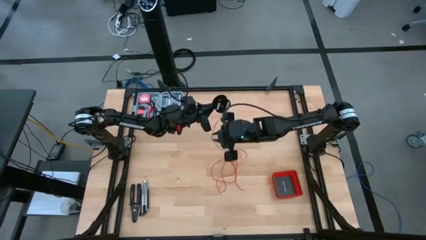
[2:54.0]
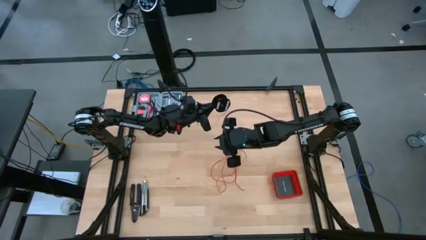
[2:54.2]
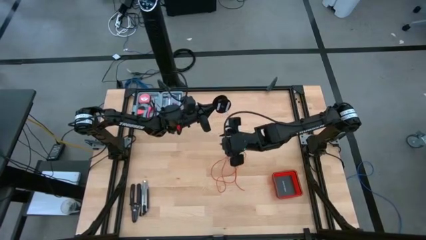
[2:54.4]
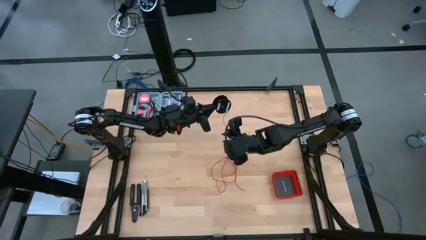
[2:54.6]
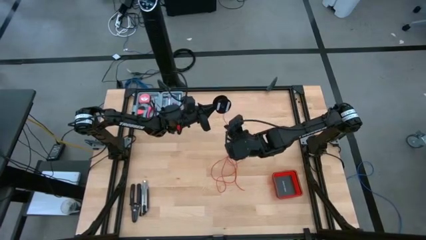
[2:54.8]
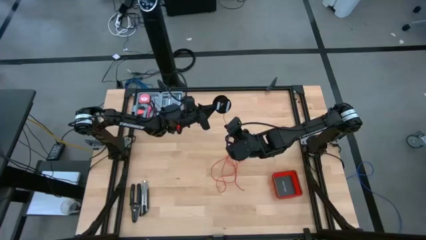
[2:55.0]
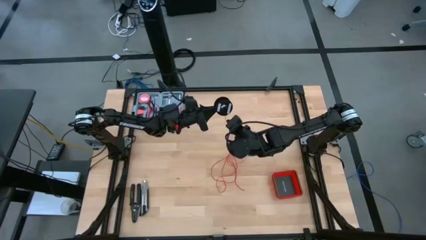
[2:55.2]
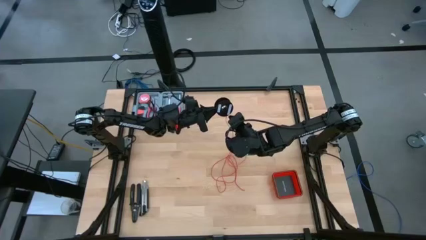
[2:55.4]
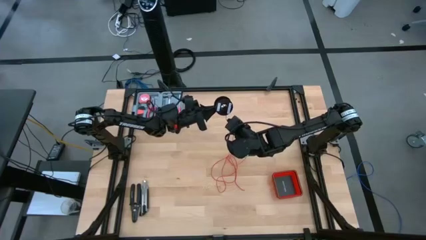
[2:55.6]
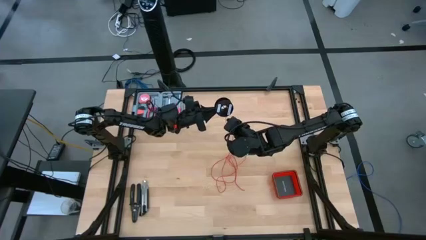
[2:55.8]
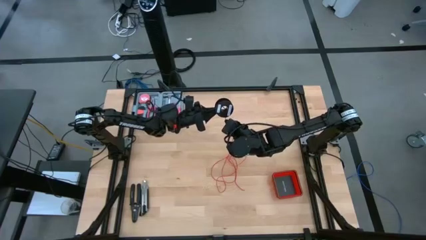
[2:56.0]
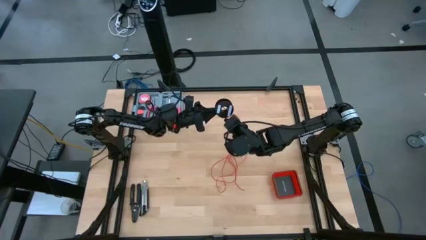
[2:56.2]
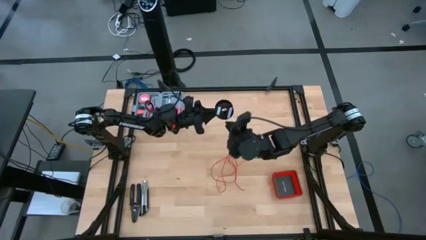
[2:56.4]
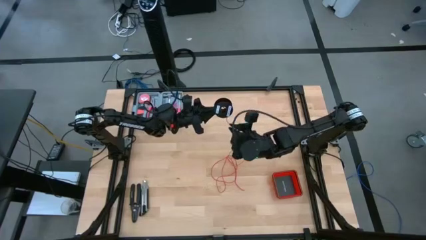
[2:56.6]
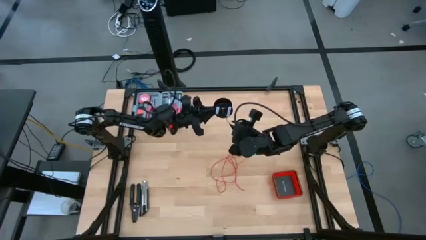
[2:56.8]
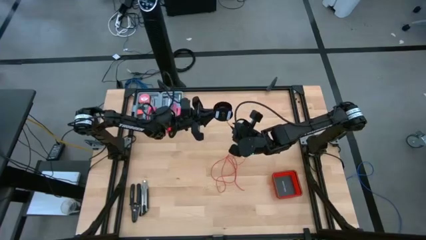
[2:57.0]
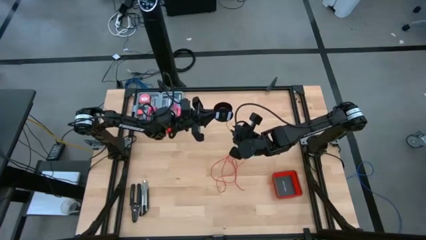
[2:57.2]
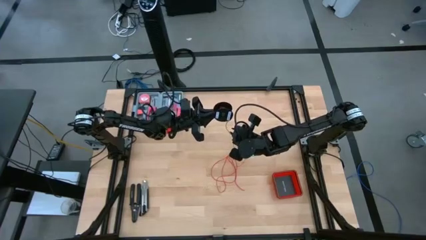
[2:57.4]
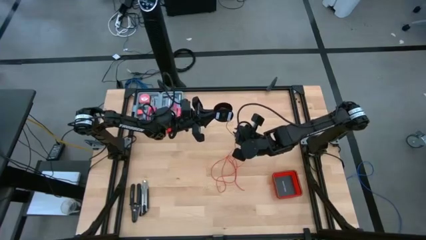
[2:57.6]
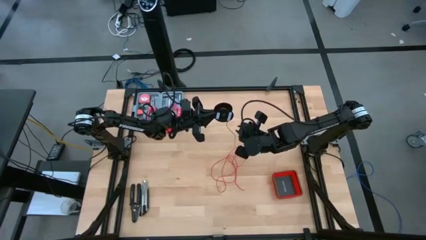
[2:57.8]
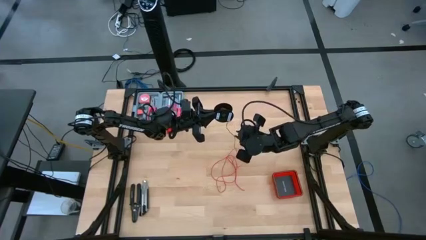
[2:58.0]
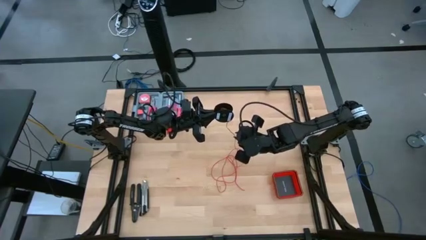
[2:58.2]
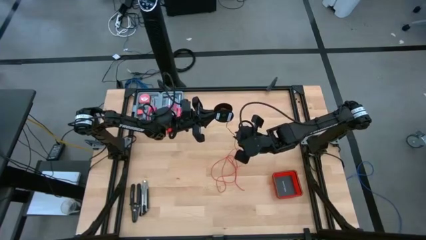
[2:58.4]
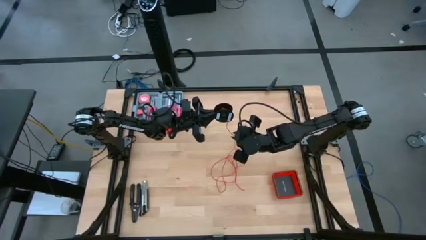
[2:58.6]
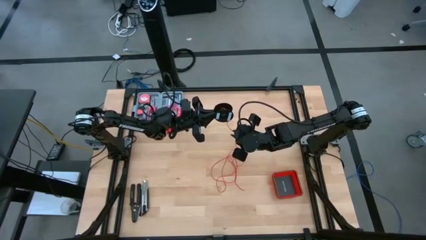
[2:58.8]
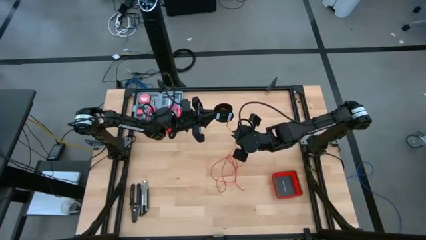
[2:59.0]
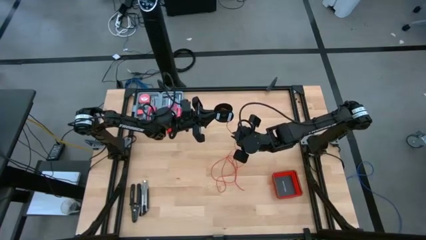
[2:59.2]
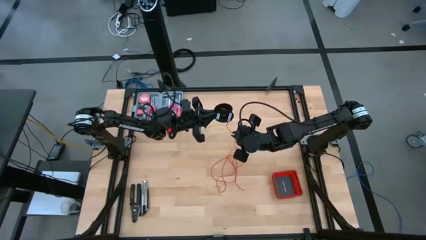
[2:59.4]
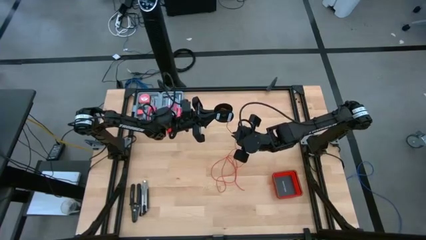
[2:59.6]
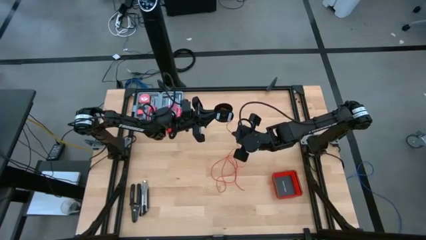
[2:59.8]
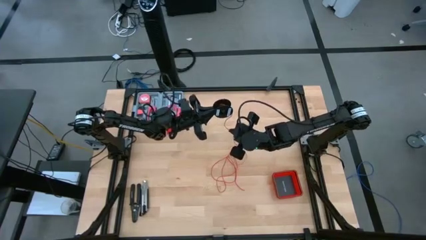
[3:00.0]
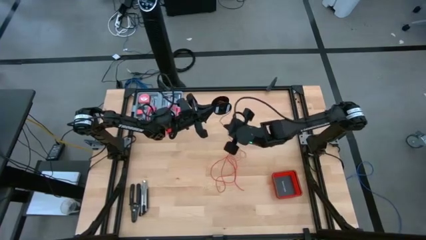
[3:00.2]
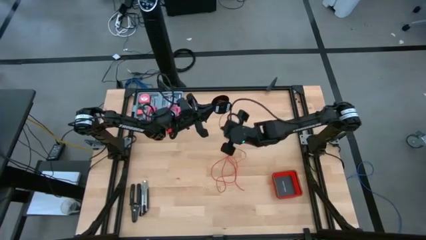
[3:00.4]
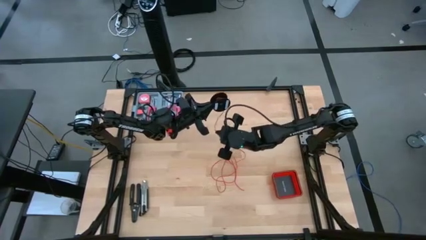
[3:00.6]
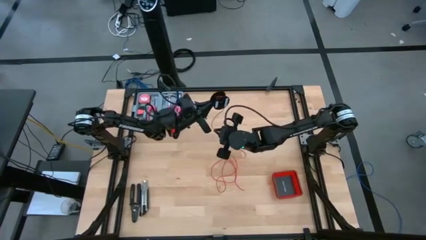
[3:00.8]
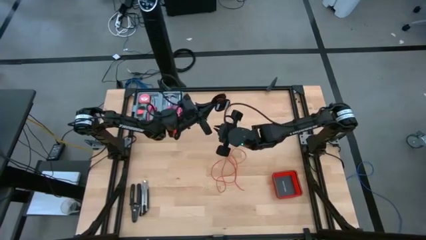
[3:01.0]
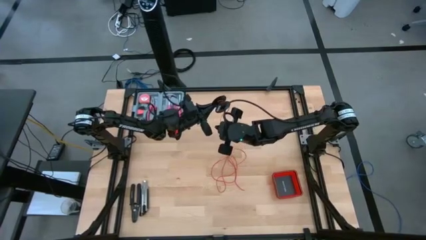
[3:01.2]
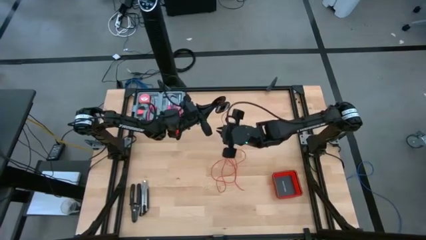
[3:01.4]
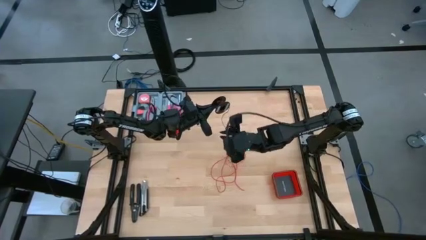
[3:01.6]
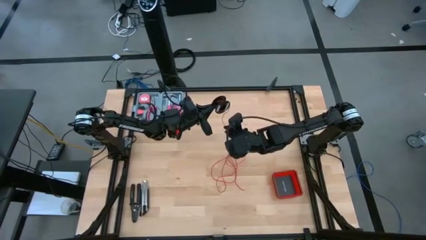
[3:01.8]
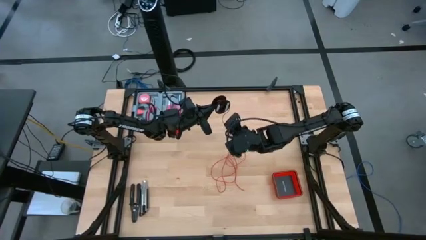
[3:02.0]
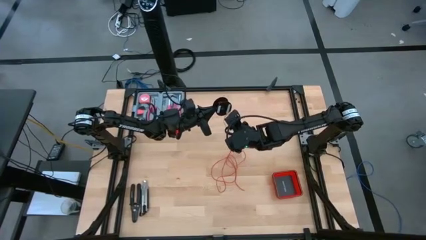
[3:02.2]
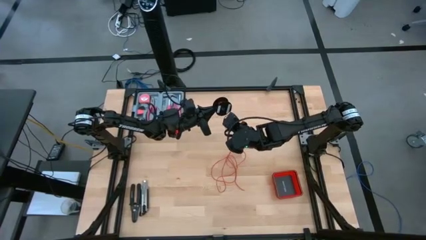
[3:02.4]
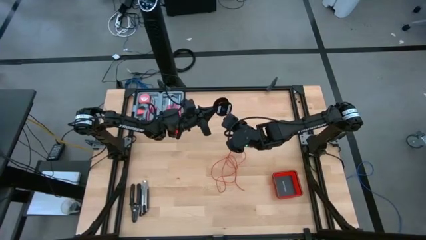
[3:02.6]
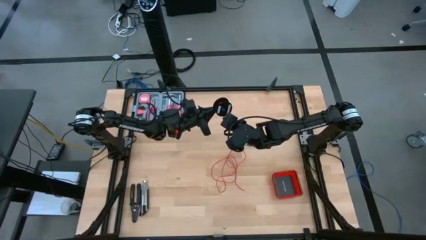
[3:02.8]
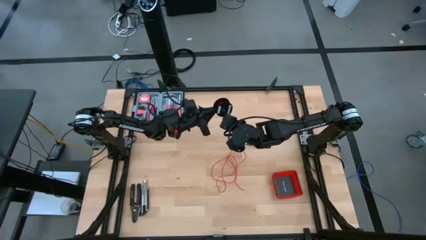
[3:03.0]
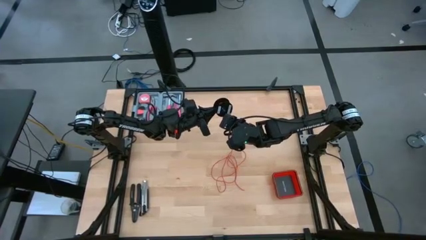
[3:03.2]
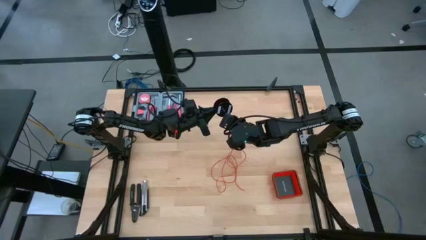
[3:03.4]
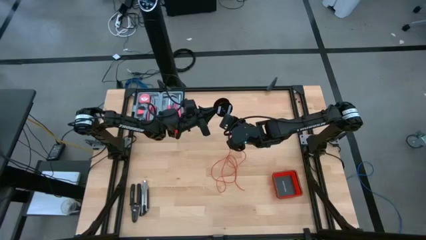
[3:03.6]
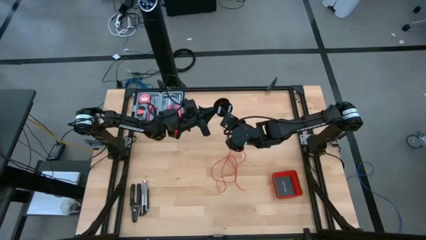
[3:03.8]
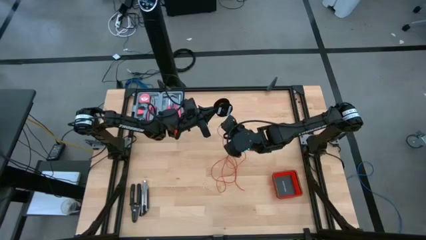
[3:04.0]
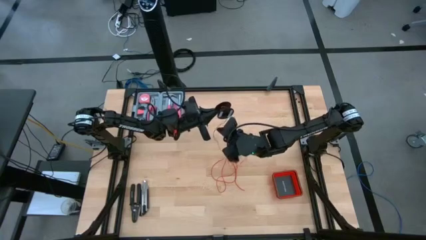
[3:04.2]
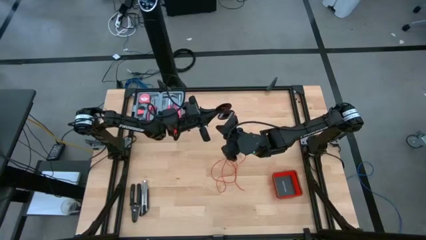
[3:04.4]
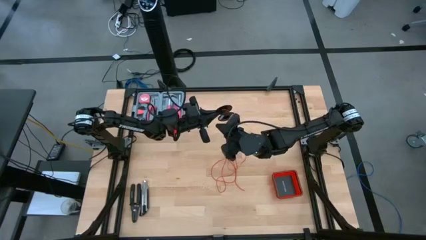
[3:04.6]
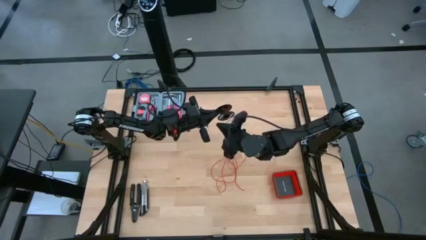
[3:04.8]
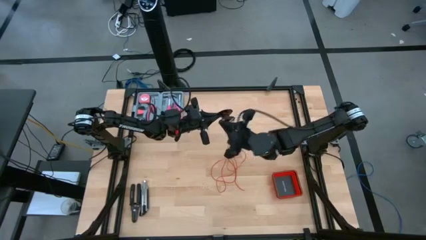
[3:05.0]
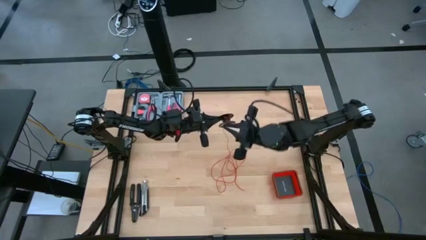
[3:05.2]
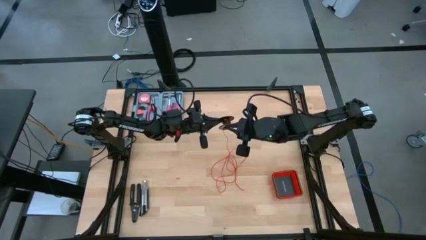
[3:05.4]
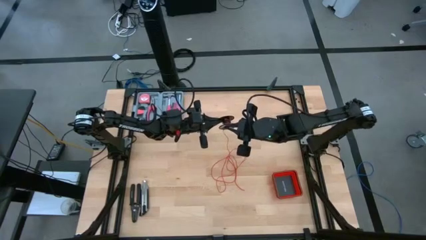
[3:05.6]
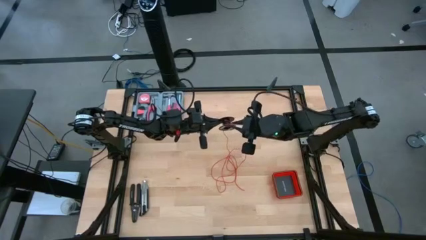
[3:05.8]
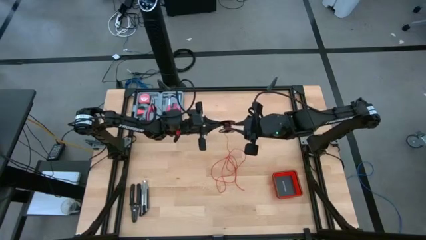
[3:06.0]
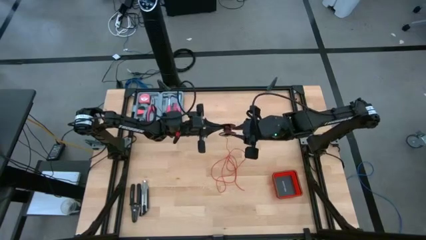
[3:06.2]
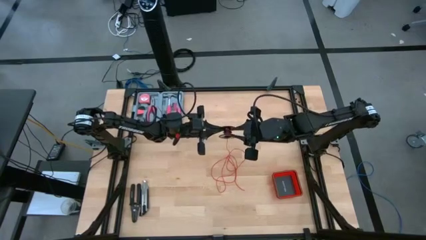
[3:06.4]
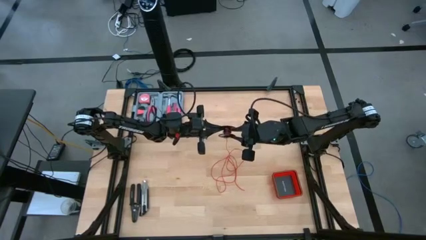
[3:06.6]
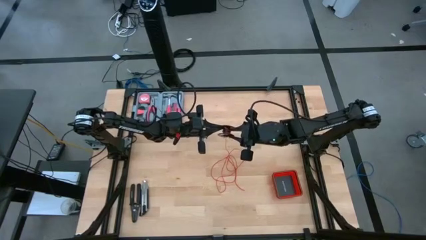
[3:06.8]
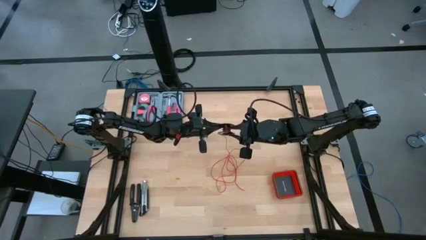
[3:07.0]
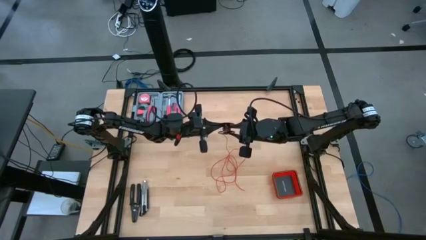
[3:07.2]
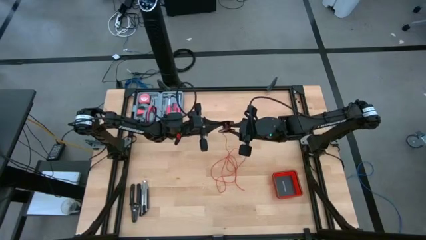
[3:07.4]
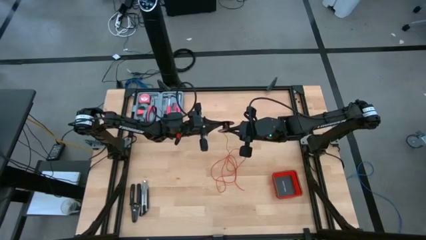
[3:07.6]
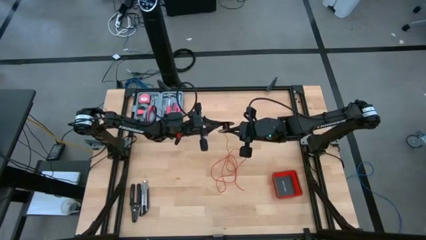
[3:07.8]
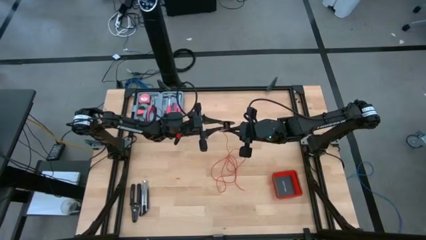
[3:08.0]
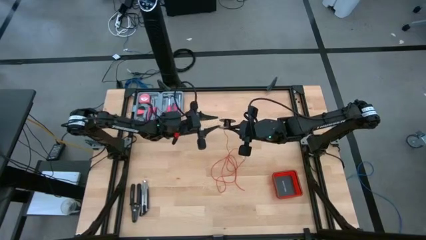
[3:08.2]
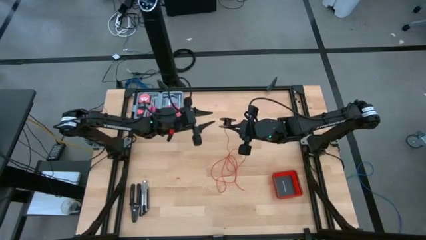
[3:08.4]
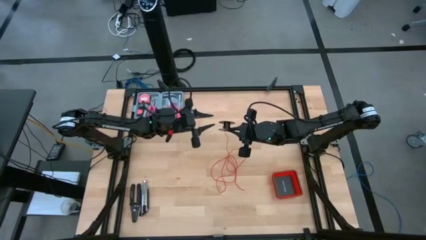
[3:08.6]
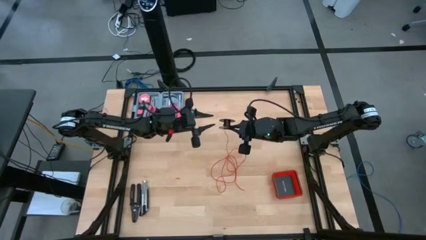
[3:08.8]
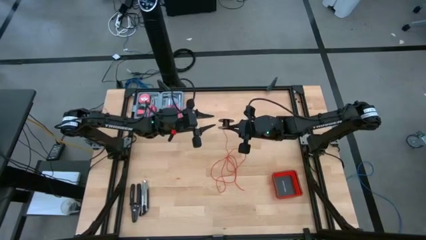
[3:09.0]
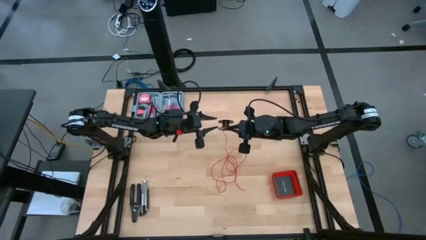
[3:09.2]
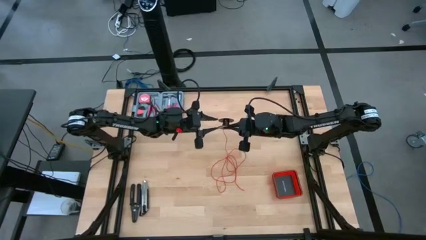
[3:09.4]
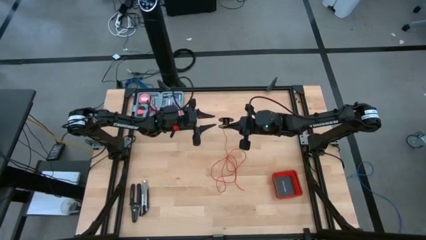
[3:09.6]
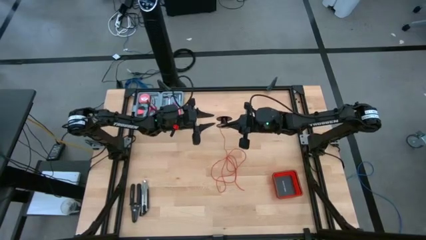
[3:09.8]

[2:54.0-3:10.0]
Task: Coil cords
Coil the red wire onto the spool
